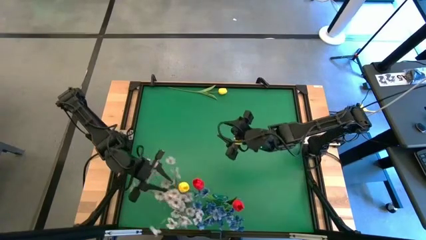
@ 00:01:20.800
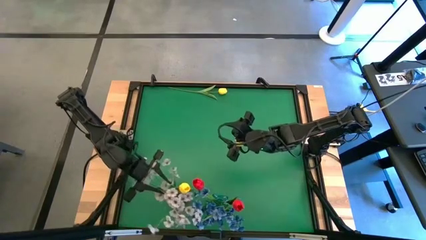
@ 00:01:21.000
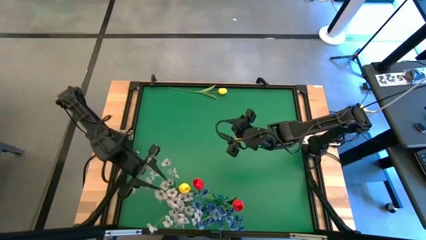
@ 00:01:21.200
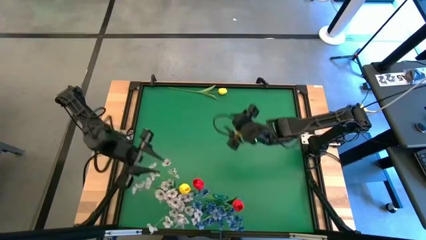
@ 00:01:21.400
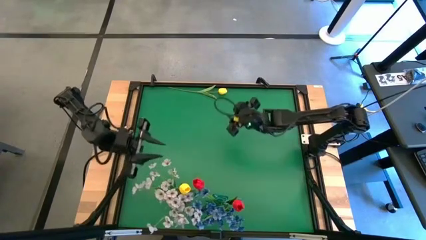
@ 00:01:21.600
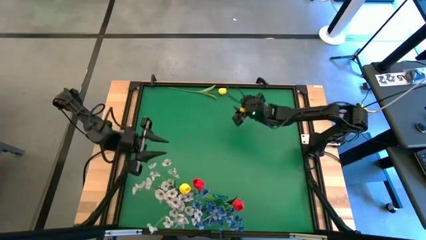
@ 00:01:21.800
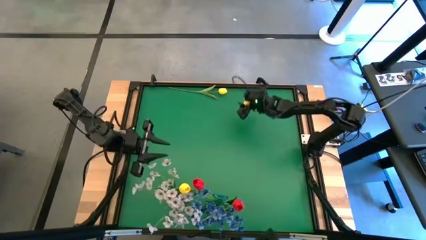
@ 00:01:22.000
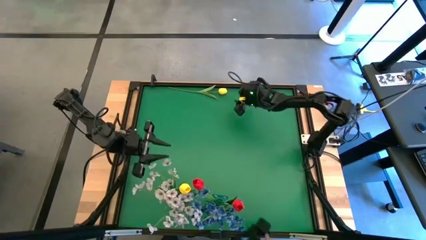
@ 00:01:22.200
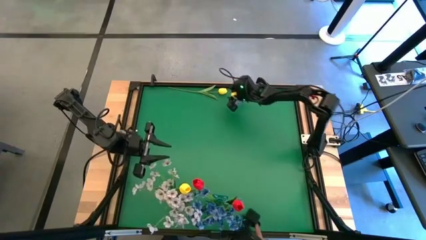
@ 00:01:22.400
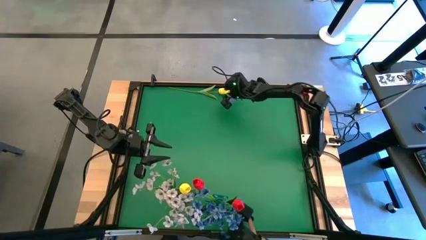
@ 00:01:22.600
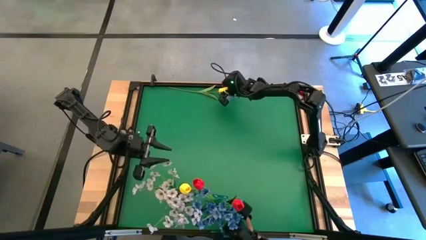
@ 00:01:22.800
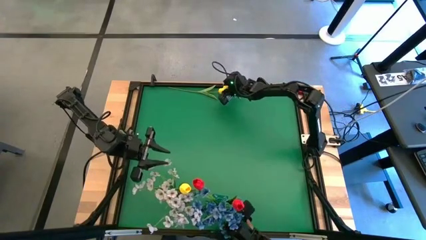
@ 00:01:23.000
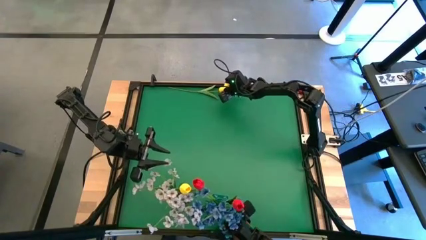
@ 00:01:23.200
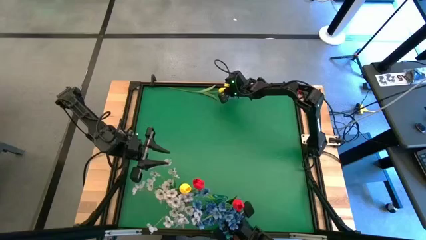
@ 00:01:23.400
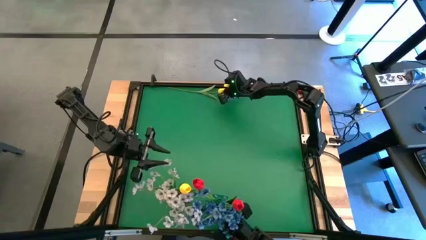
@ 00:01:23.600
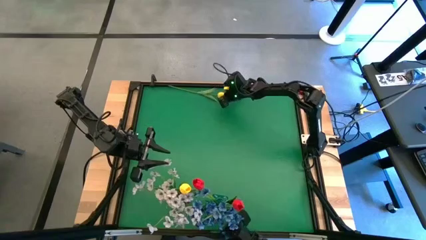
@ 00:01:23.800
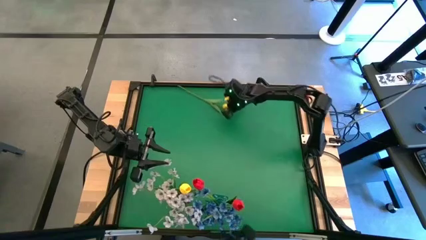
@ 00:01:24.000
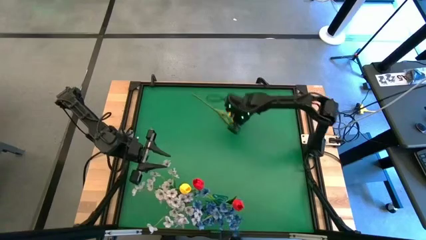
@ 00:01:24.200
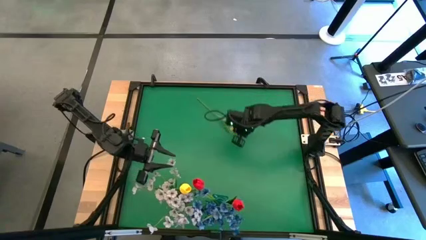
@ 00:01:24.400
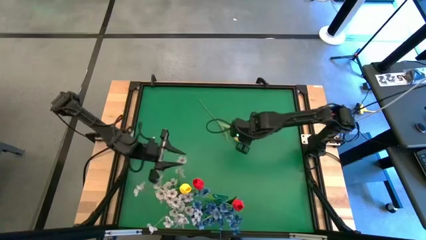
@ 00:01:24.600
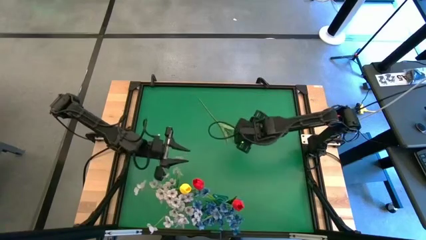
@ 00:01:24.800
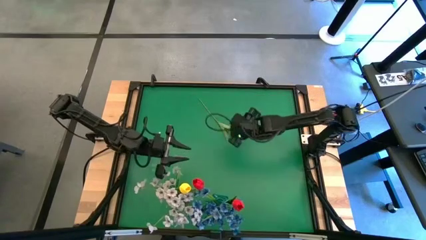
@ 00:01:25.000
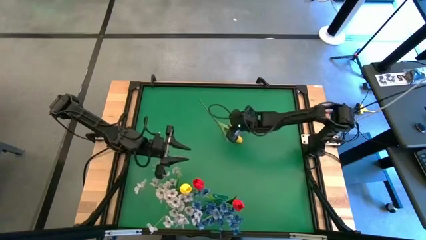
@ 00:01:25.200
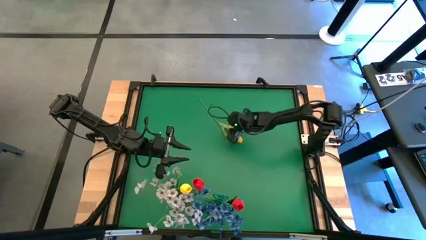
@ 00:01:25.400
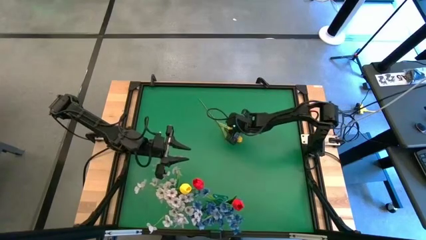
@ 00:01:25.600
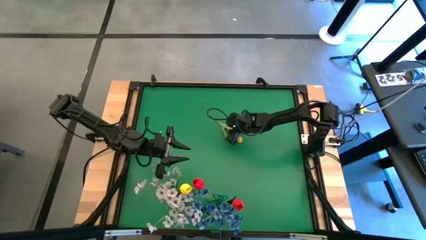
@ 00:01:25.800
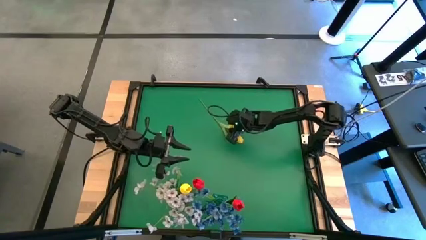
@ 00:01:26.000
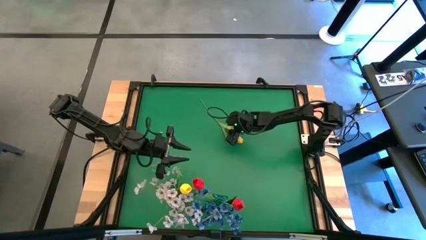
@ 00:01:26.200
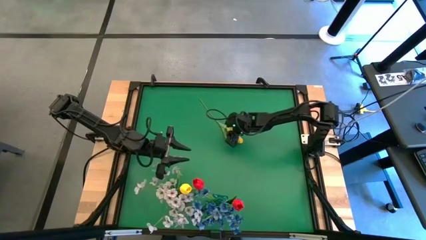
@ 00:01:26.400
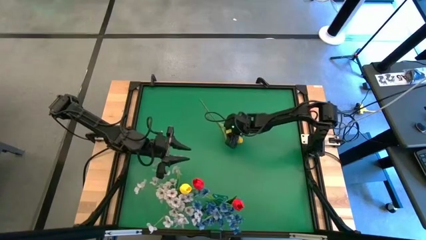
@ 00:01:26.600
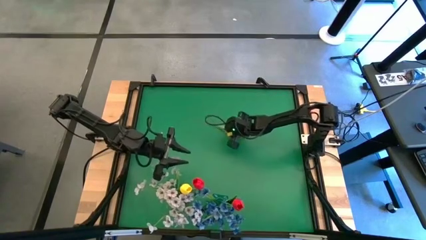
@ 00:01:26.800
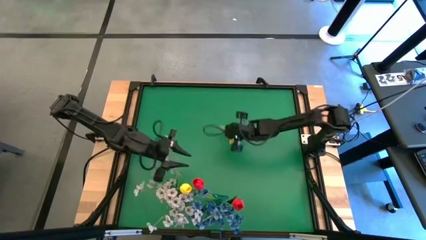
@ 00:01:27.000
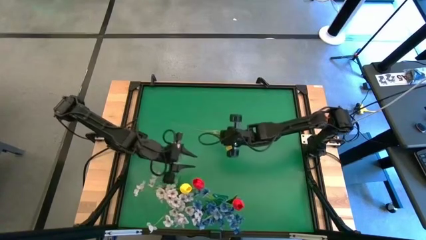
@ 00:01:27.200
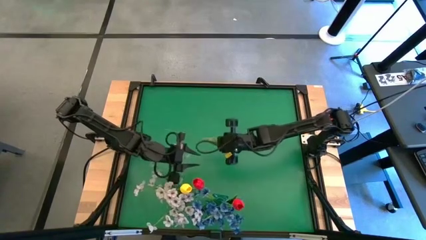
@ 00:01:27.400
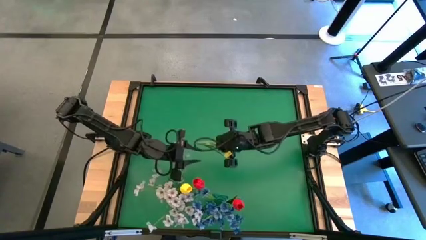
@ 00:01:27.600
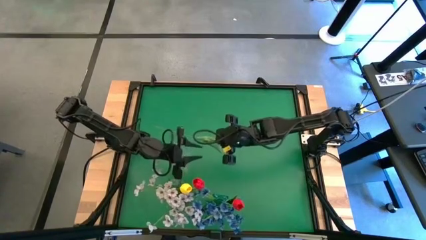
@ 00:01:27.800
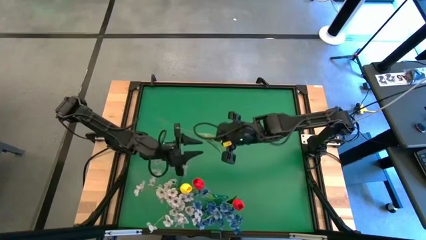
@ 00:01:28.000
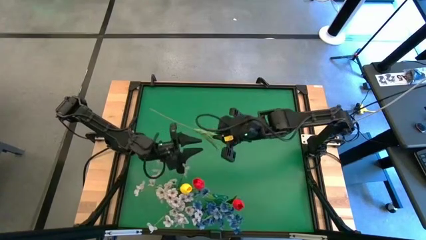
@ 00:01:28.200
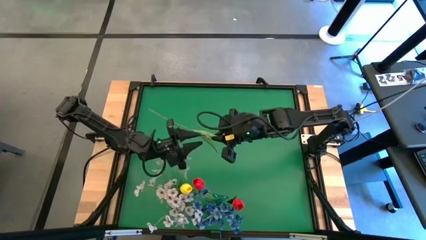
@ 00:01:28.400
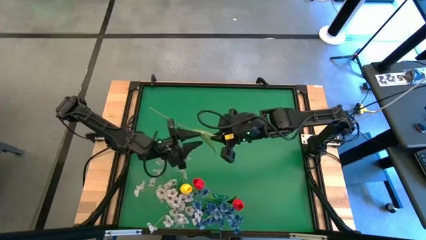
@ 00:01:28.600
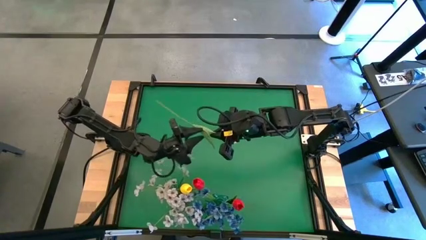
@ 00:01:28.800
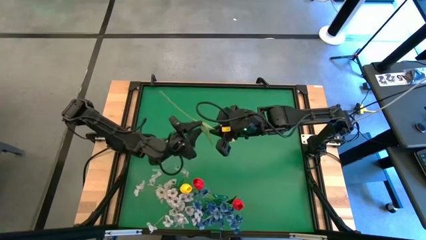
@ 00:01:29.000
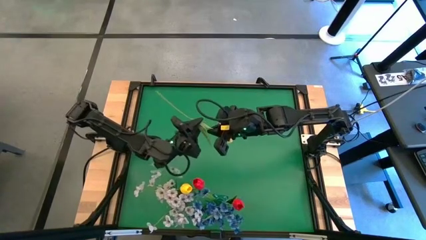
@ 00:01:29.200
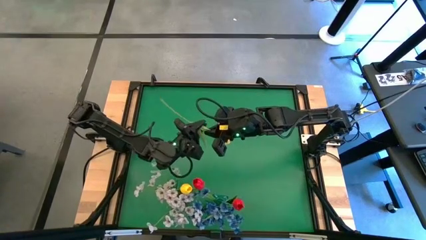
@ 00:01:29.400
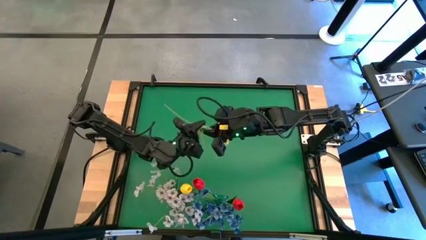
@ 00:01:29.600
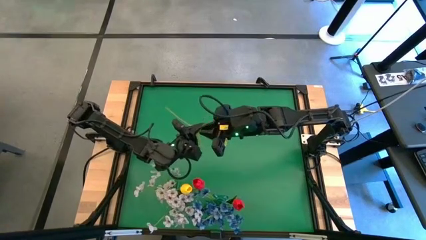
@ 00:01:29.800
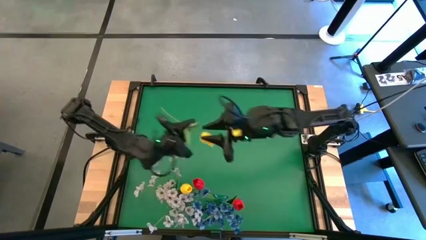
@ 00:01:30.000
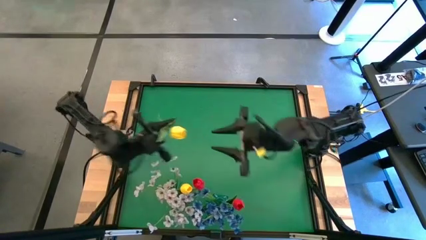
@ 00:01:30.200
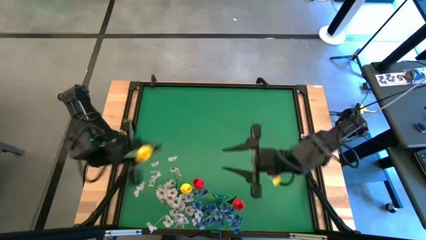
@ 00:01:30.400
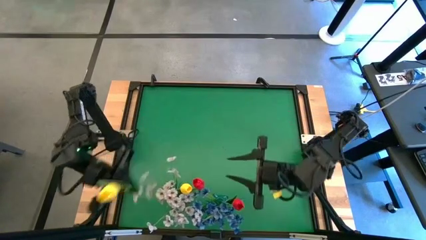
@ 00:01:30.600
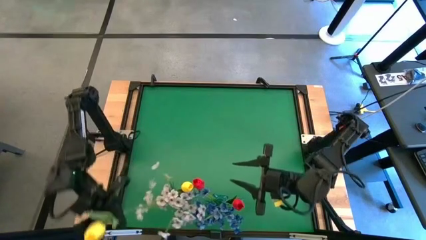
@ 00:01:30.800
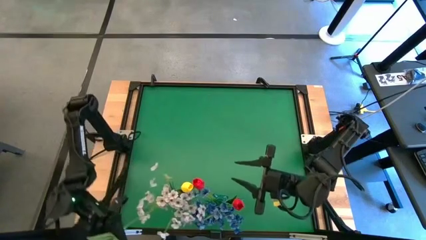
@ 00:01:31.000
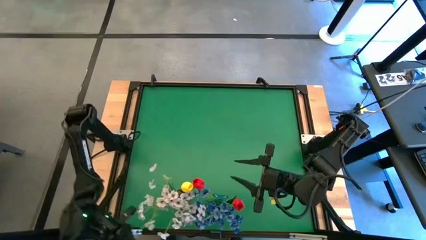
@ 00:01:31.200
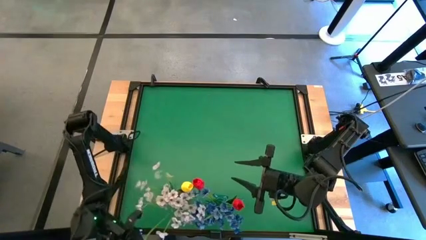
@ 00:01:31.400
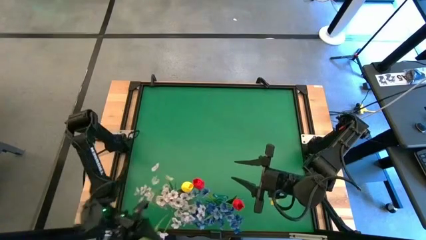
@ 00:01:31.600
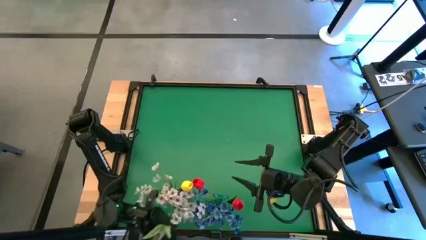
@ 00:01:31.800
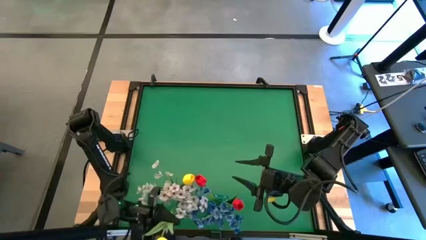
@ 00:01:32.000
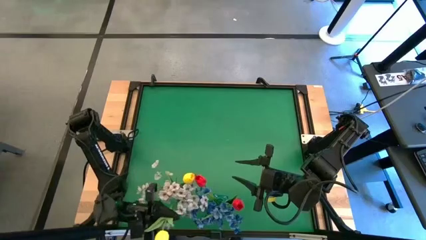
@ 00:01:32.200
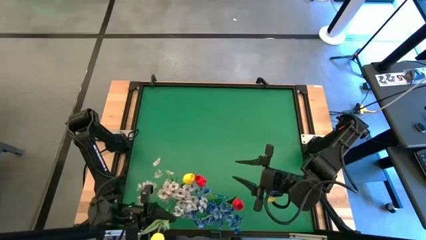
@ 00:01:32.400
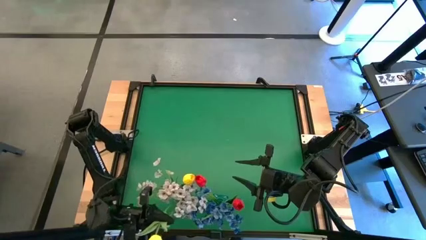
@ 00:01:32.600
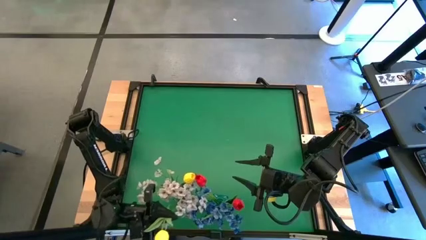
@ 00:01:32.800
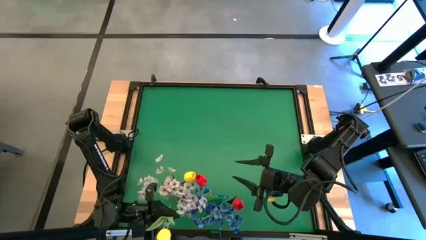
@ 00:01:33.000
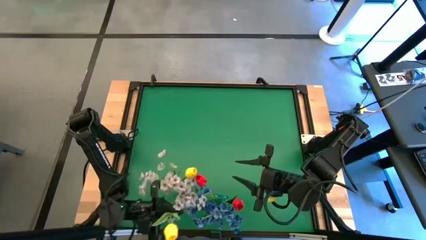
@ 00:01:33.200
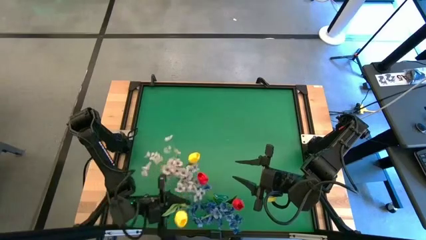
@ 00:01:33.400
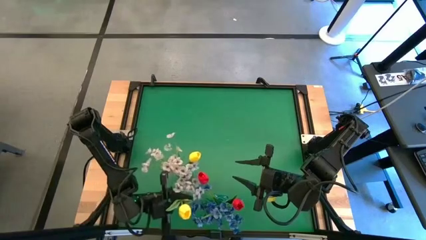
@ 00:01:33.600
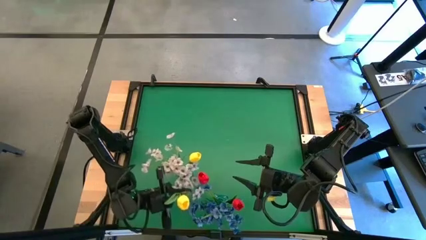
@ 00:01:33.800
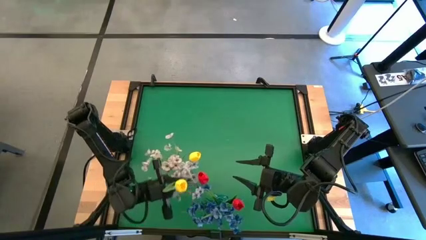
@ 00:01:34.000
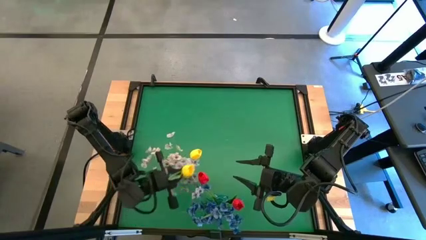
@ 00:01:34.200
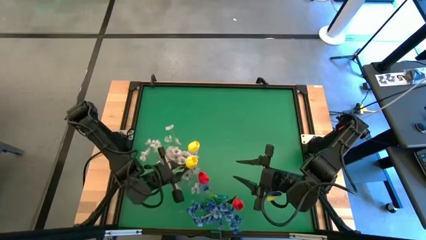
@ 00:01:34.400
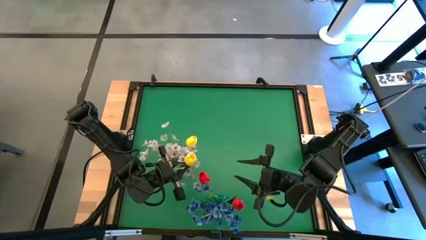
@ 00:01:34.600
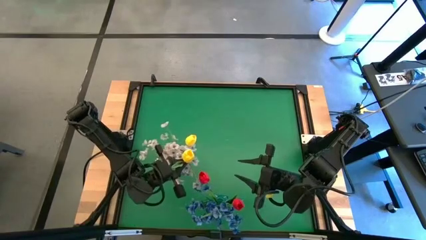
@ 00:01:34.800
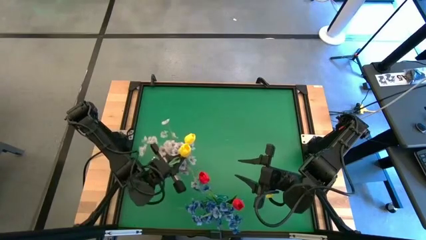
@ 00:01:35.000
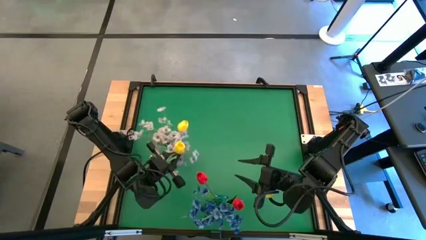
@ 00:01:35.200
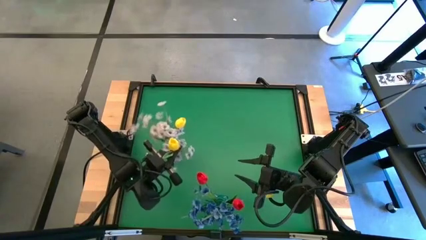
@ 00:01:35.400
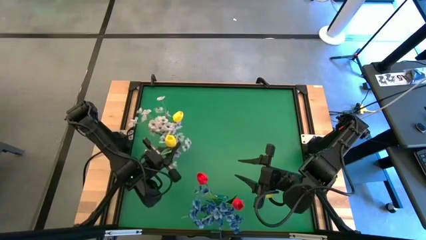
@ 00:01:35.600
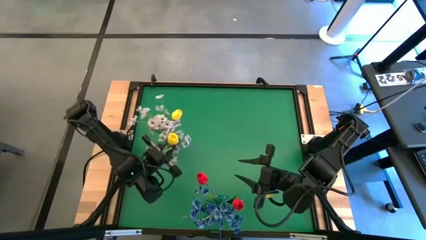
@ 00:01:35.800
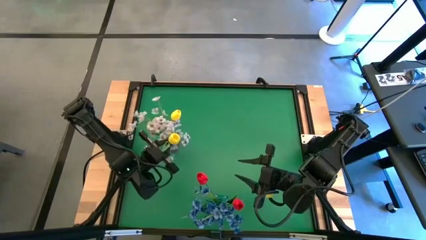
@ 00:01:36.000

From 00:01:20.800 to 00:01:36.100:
Task: Sort flowers into vase by color
Put the yellow flower into the purple vase
